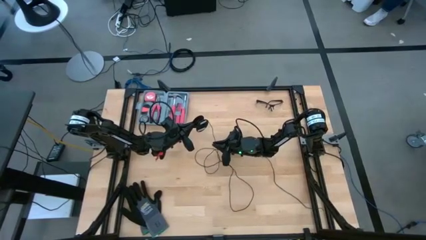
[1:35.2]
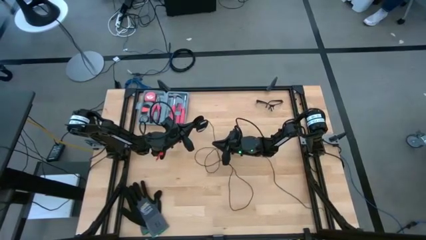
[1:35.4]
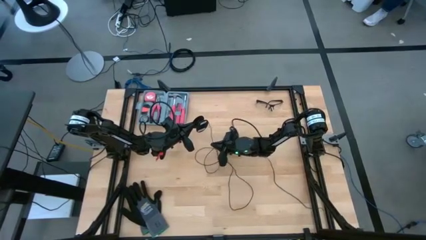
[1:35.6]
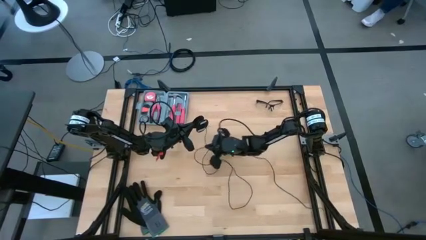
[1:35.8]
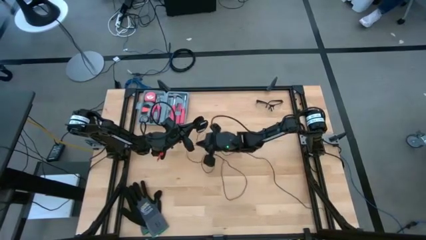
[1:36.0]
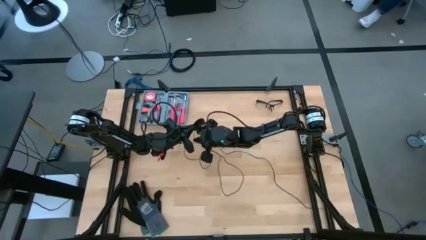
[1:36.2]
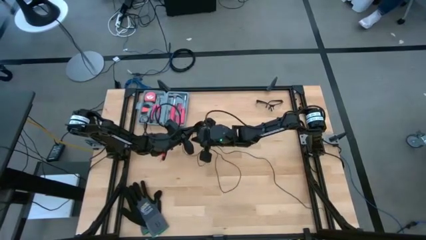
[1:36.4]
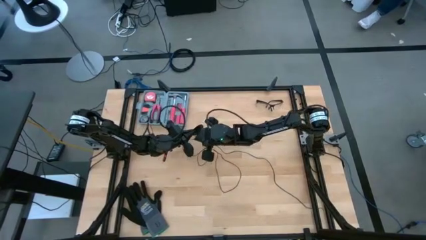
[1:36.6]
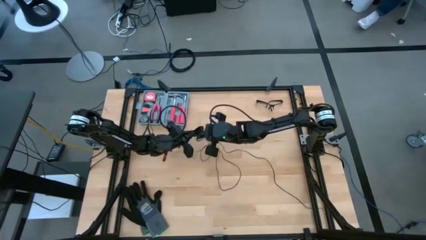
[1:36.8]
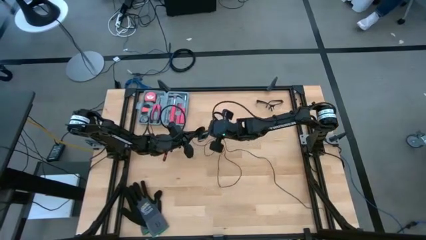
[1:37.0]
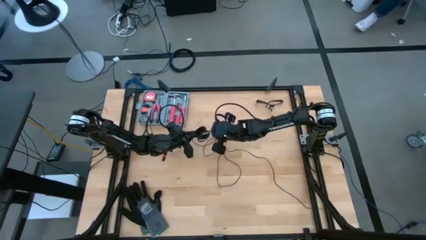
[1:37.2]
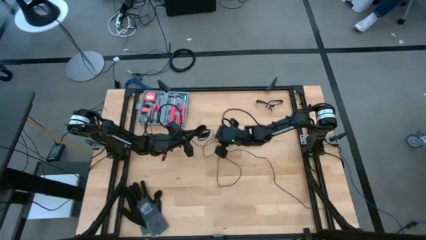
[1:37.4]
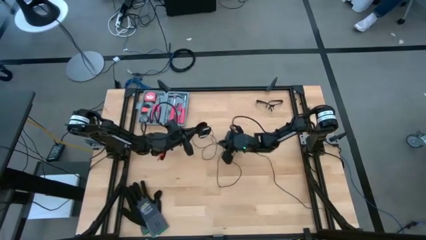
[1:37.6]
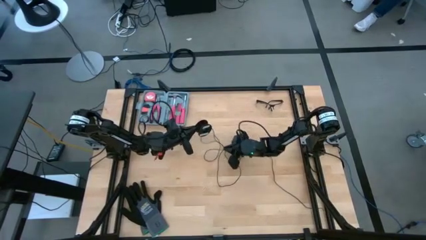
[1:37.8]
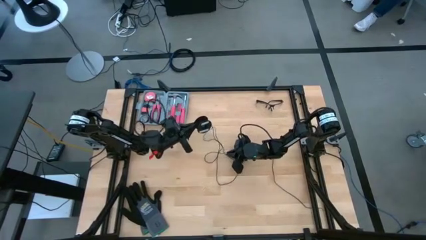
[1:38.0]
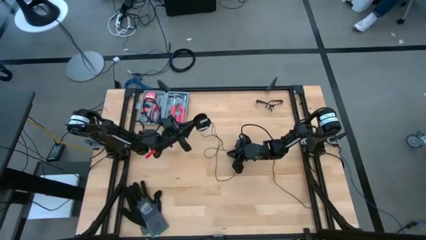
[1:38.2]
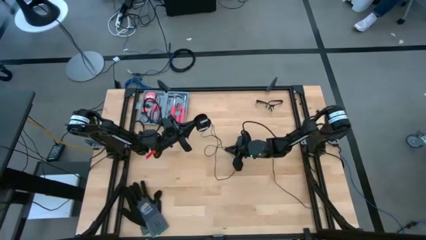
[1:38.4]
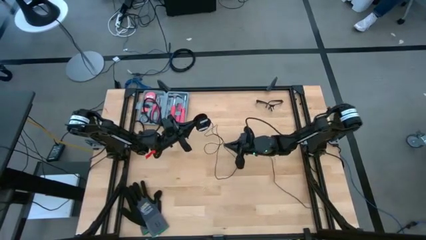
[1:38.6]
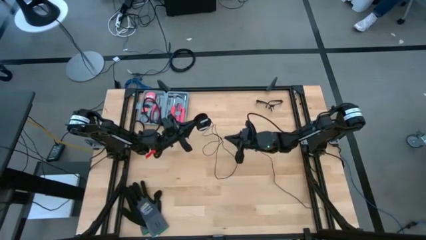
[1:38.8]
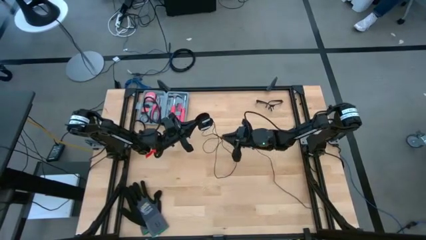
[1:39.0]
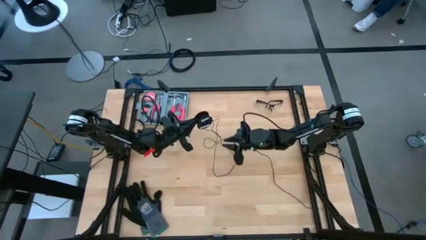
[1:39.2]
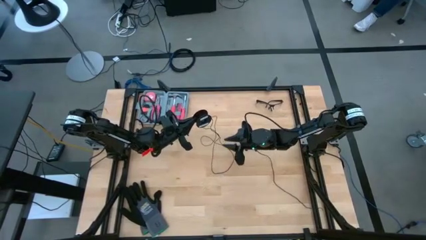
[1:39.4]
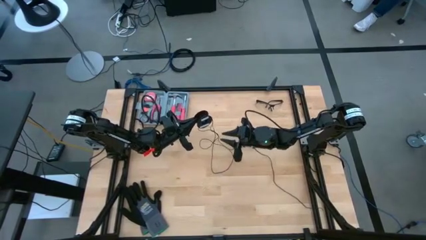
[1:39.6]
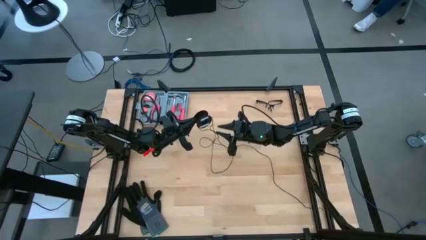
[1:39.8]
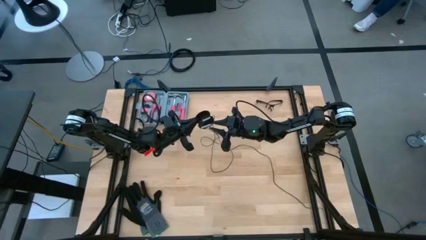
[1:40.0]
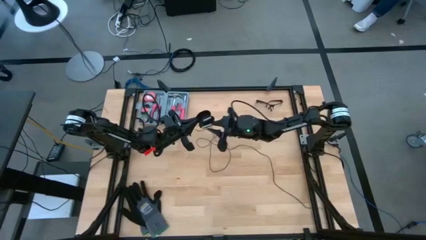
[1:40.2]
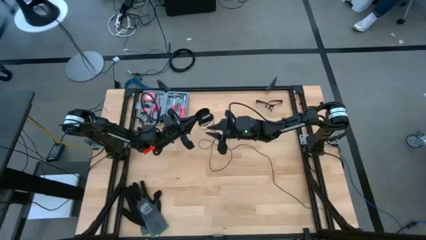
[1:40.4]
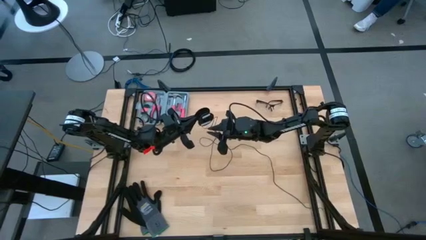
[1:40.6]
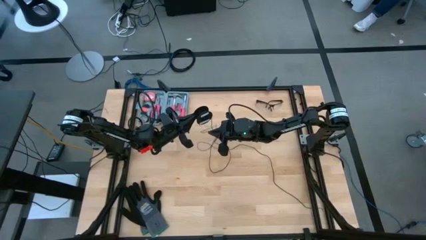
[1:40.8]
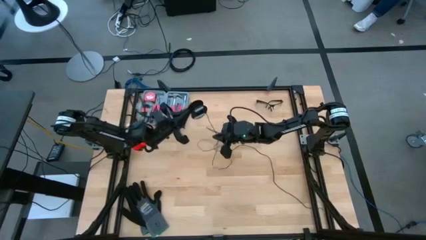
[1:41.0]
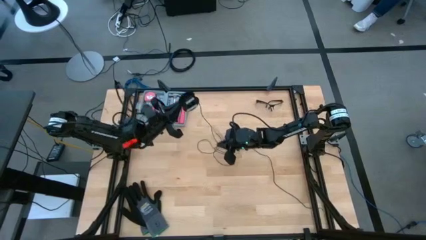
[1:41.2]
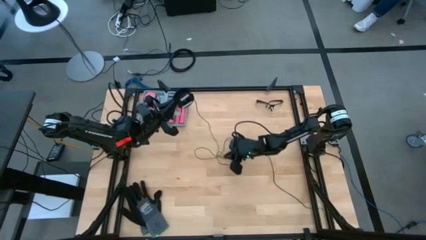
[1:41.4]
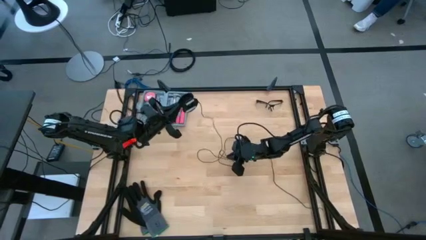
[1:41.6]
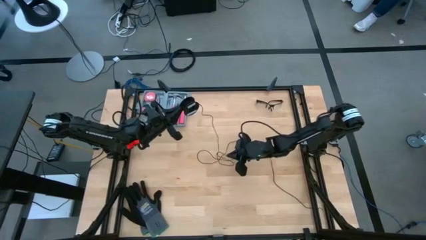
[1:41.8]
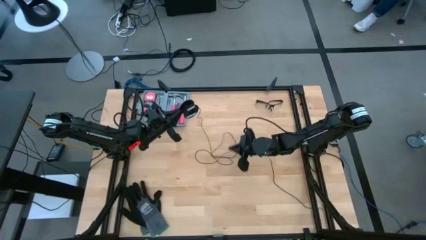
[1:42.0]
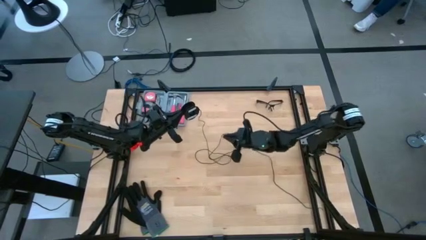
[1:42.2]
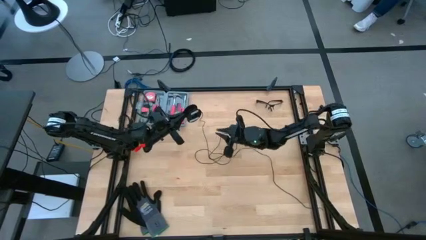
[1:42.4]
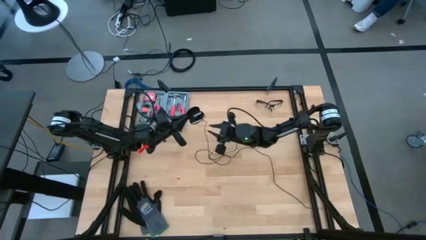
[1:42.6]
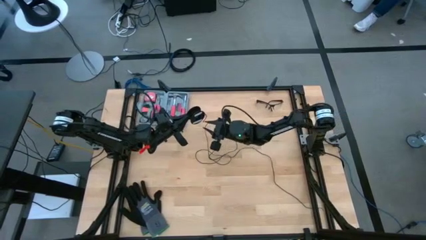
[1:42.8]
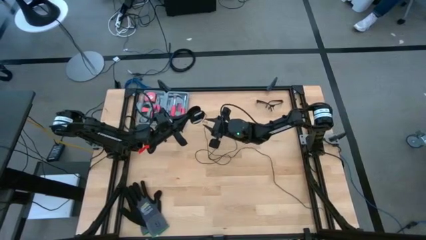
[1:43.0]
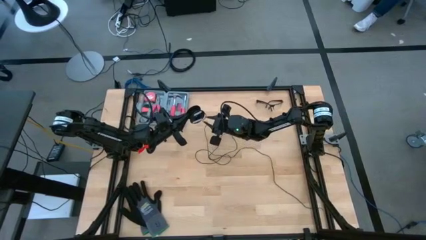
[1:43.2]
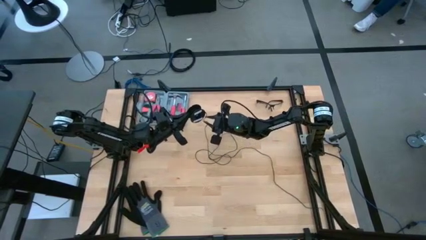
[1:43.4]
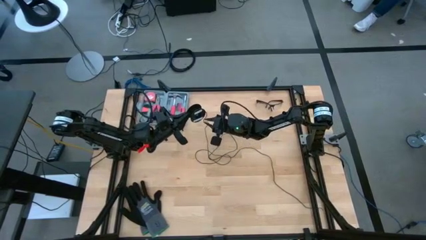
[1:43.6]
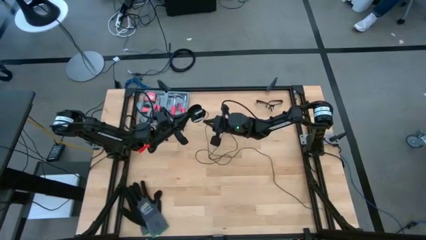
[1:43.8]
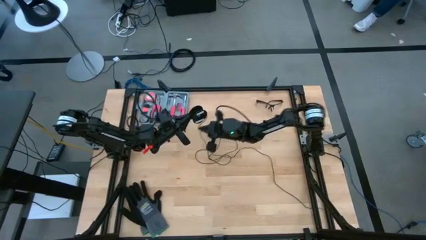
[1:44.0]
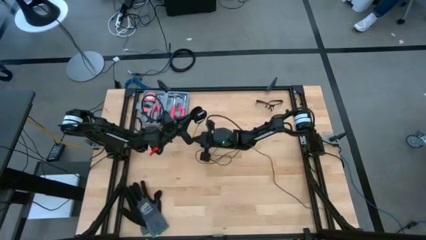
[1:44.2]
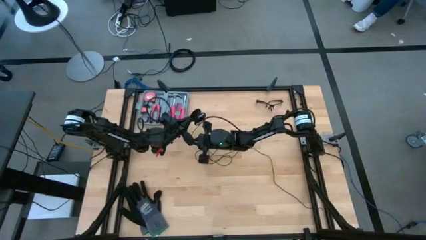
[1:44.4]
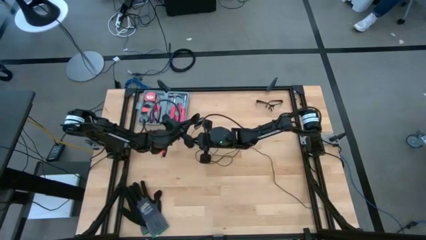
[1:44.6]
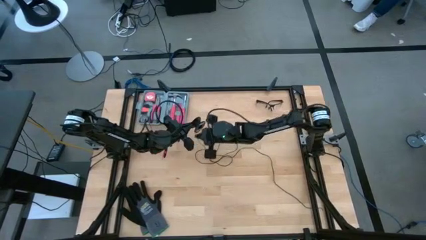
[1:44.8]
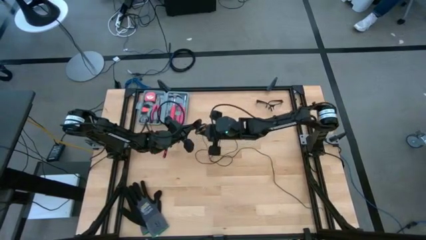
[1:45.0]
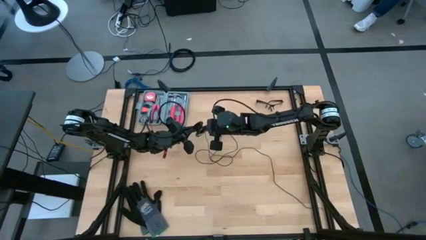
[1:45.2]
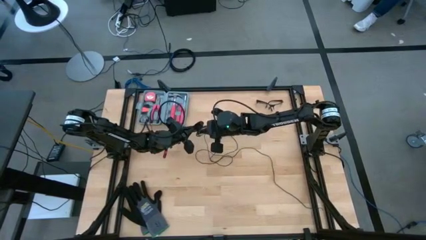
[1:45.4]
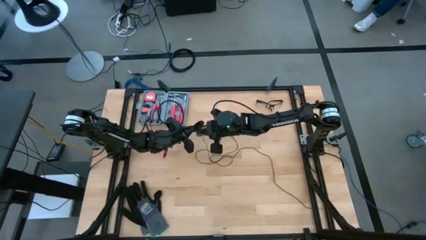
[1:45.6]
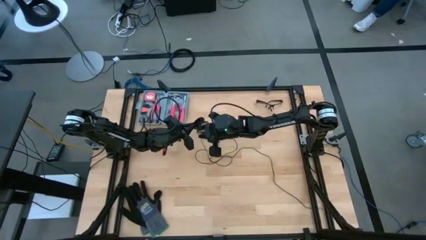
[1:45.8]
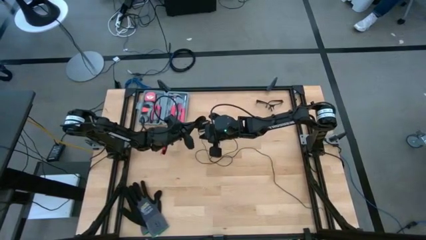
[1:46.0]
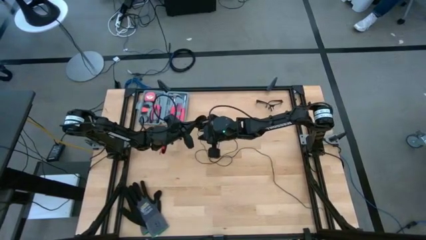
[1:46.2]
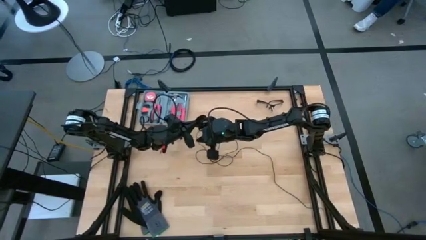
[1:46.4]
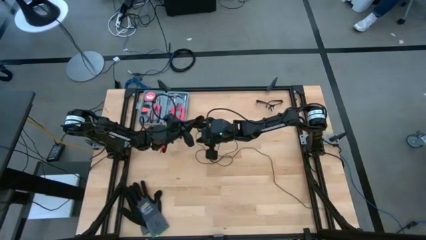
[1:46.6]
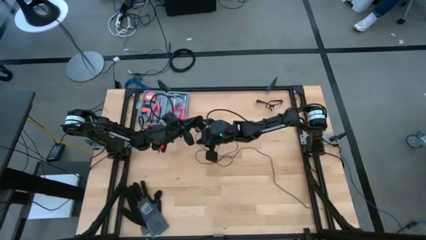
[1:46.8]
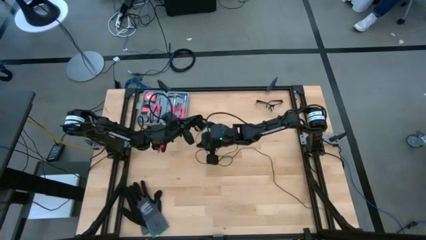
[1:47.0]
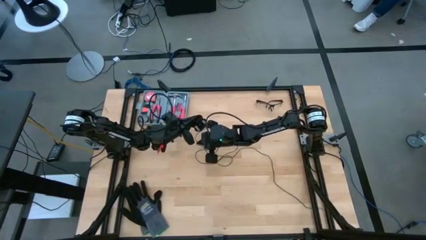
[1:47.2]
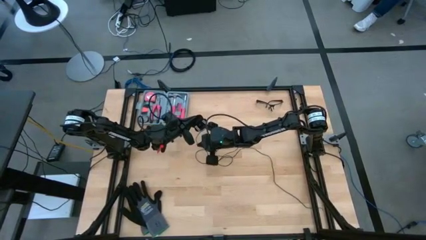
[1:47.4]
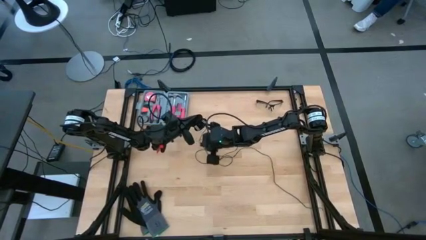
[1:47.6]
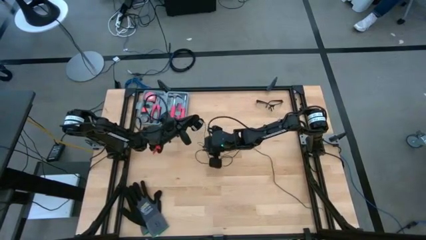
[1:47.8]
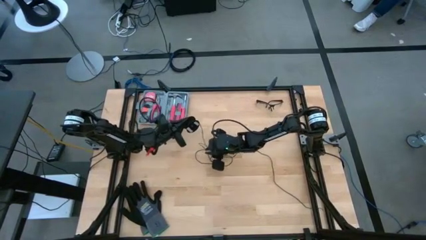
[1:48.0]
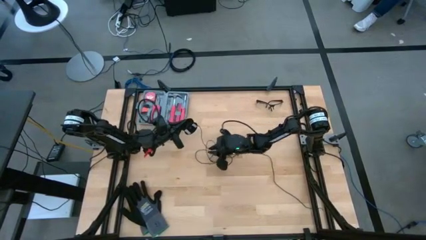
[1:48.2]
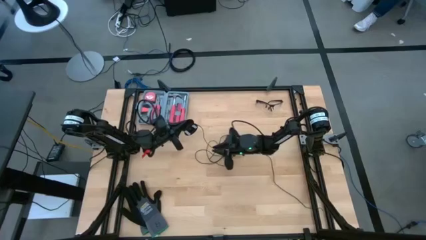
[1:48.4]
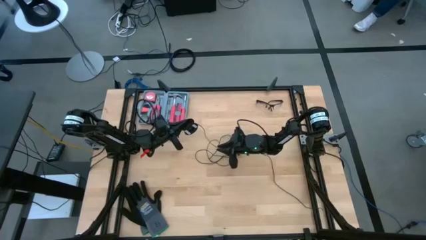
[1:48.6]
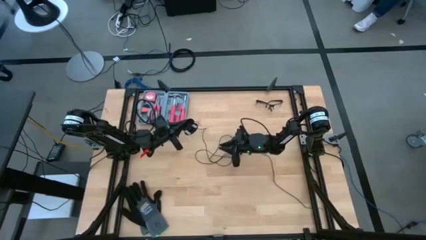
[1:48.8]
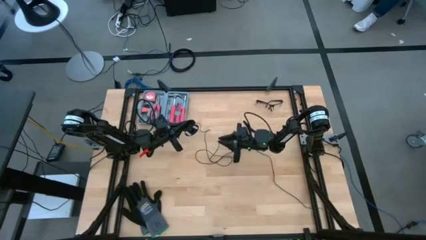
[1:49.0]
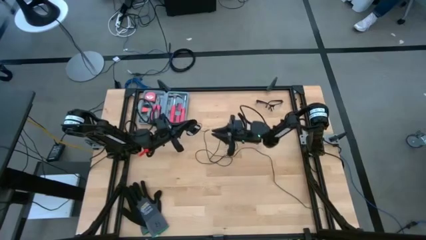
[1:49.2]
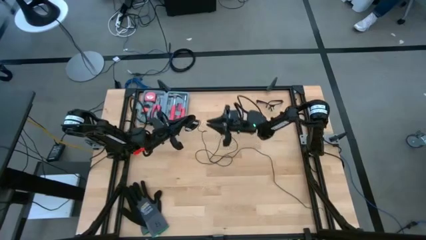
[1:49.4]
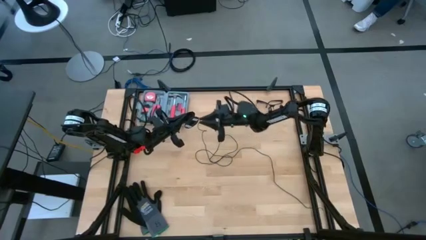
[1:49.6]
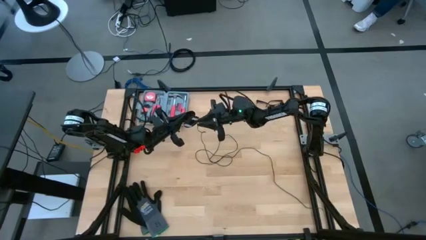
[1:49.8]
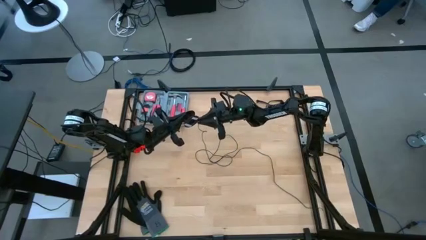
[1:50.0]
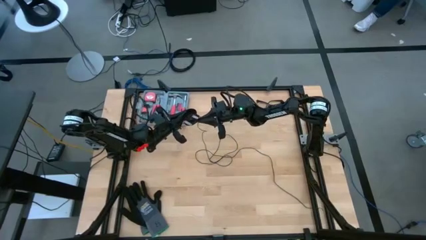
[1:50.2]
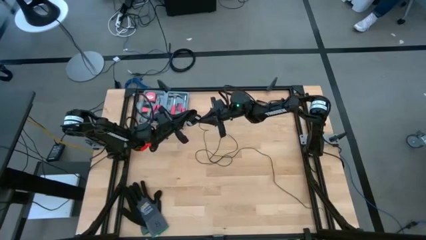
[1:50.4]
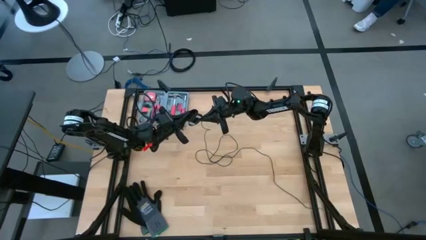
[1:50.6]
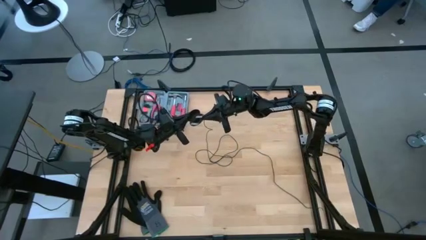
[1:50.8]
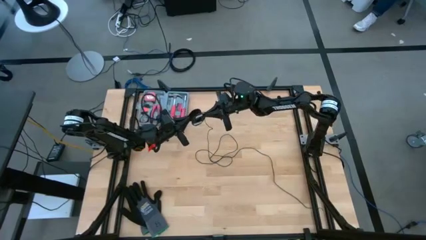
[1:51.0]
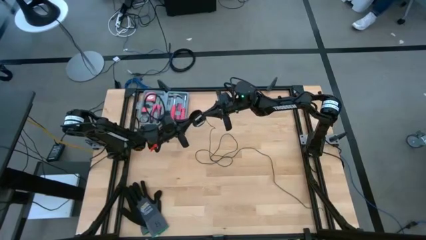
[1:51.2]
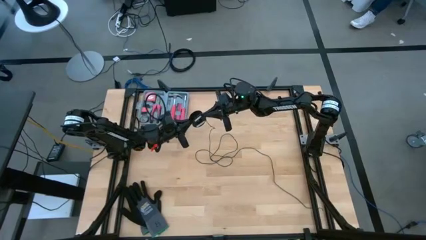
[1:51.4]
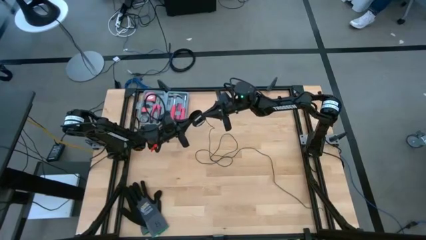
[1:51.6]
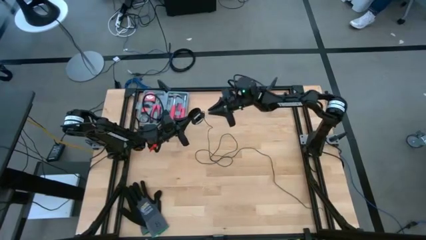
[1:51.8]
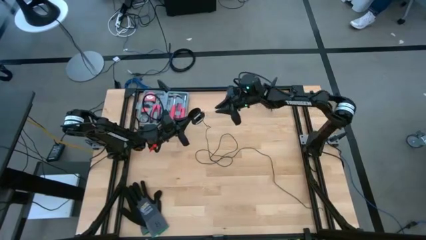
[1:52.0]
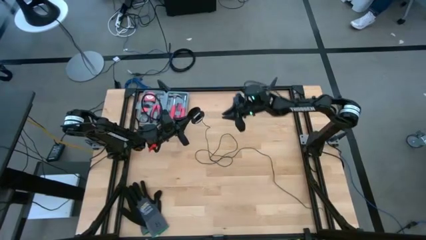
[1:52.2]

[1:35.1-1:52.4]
Task: Coil cords
Coil the black wire on the black spool
